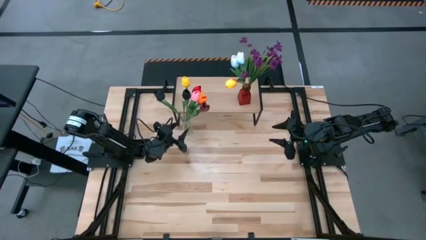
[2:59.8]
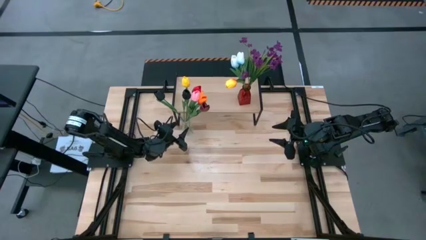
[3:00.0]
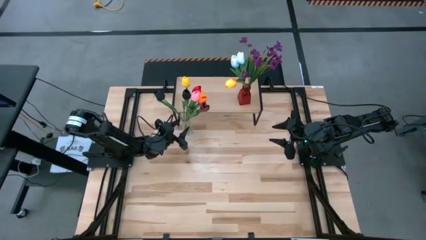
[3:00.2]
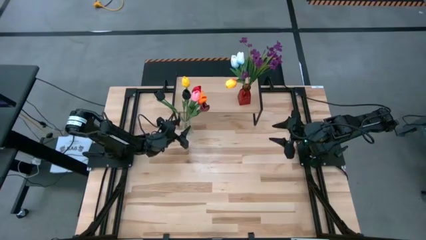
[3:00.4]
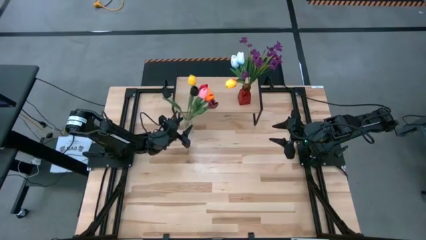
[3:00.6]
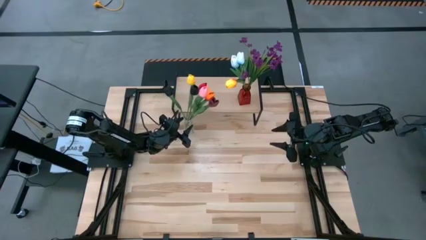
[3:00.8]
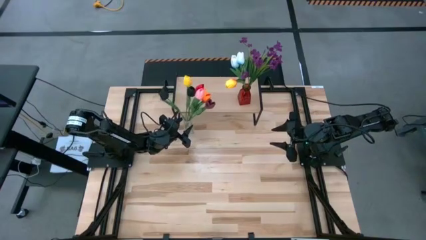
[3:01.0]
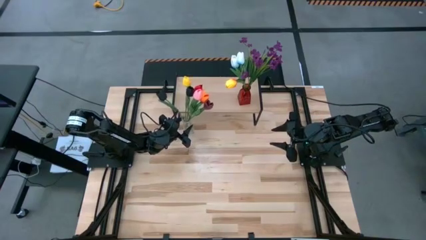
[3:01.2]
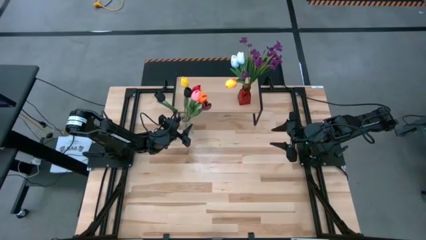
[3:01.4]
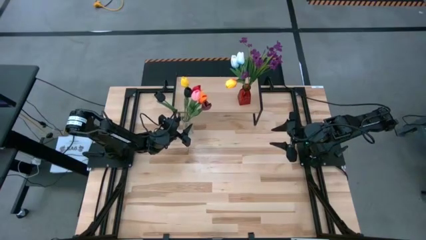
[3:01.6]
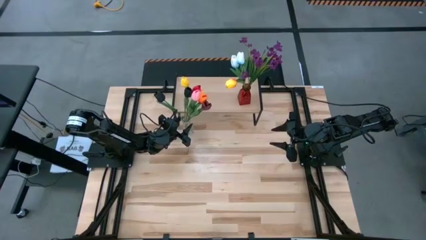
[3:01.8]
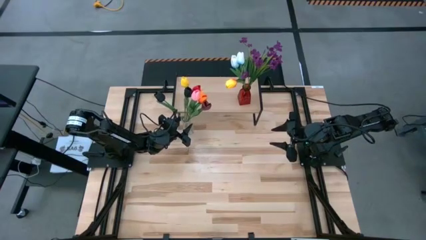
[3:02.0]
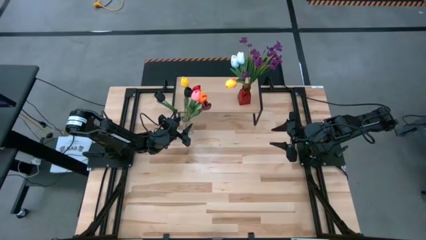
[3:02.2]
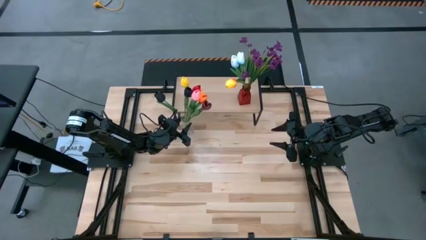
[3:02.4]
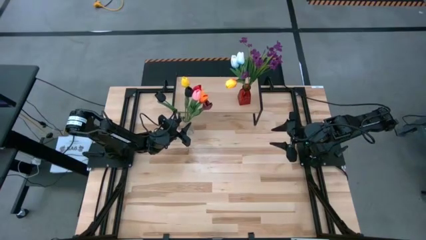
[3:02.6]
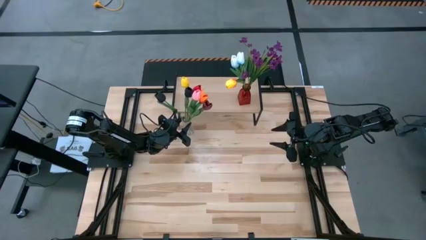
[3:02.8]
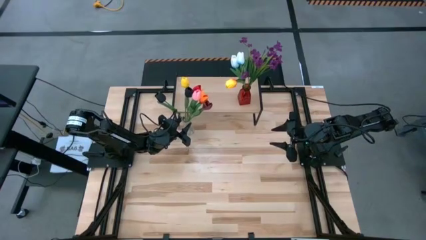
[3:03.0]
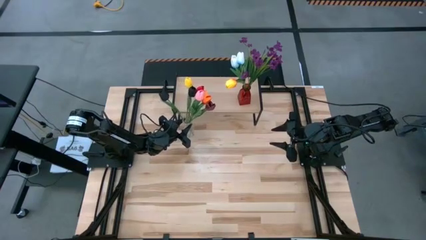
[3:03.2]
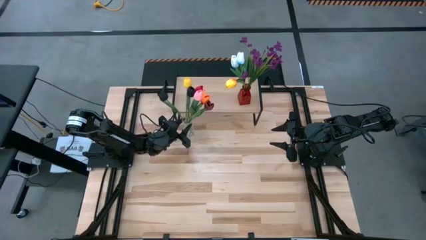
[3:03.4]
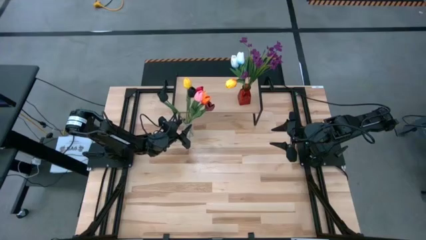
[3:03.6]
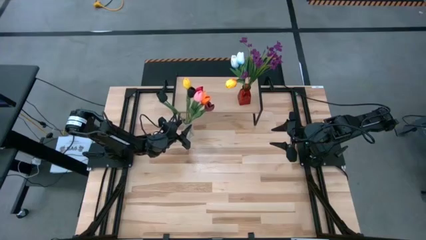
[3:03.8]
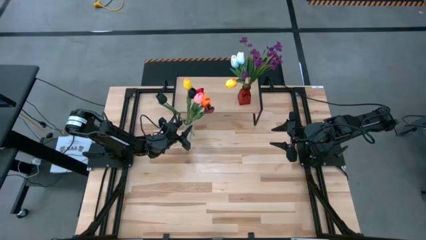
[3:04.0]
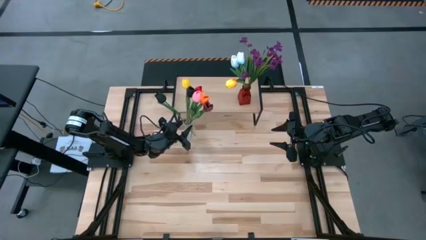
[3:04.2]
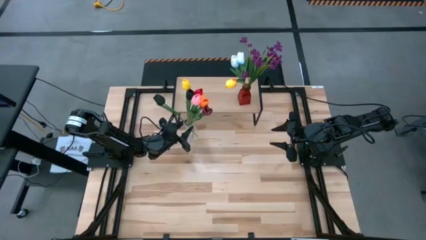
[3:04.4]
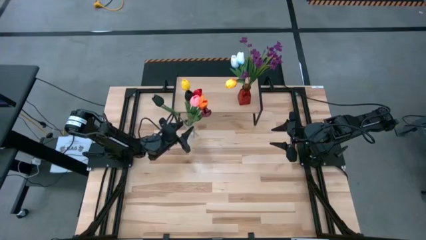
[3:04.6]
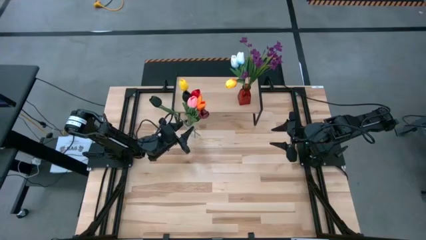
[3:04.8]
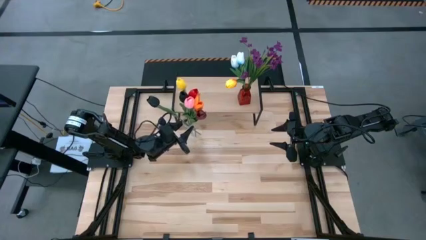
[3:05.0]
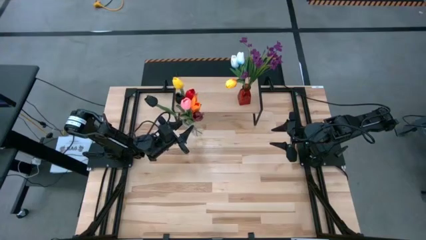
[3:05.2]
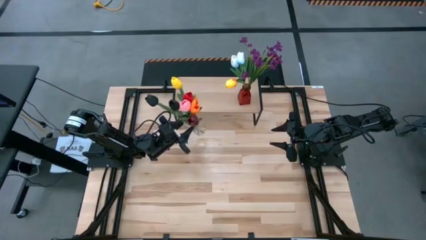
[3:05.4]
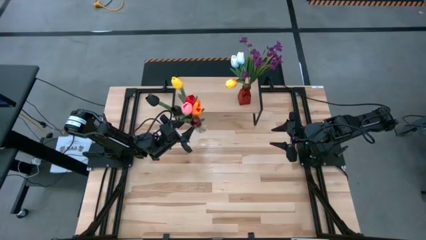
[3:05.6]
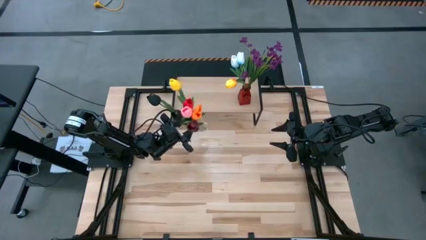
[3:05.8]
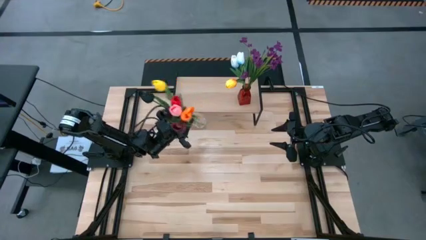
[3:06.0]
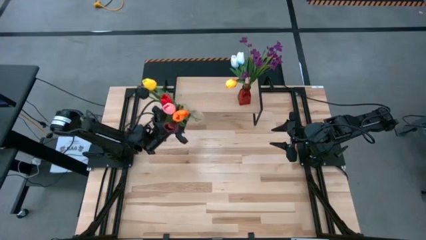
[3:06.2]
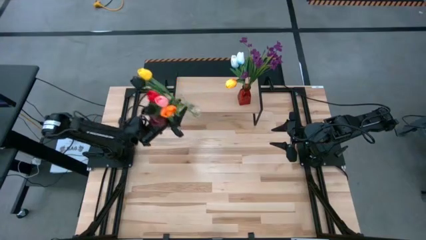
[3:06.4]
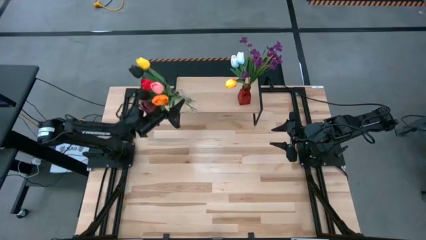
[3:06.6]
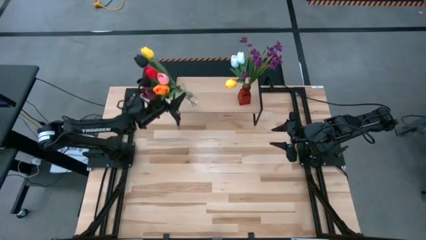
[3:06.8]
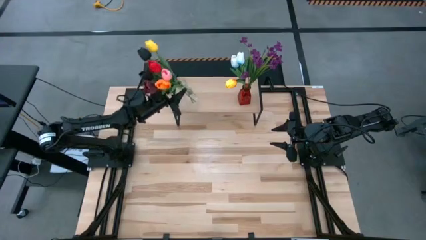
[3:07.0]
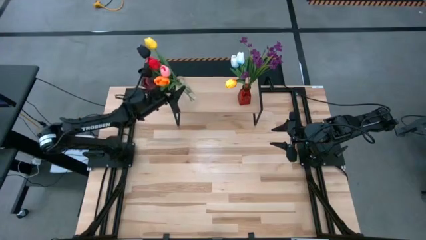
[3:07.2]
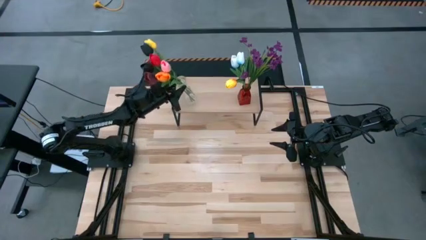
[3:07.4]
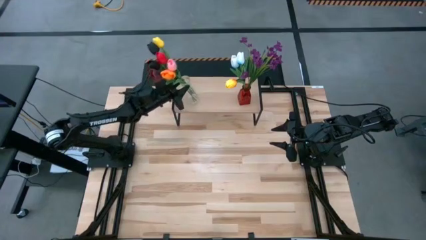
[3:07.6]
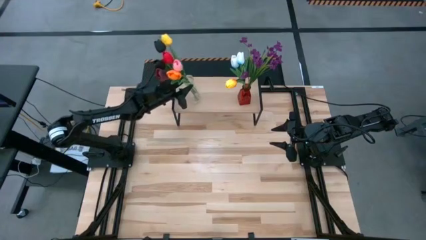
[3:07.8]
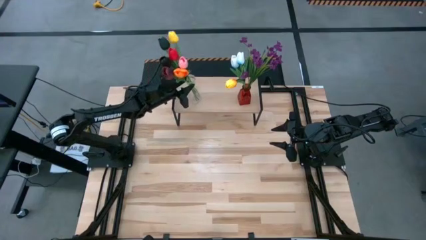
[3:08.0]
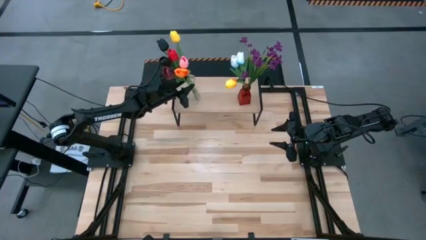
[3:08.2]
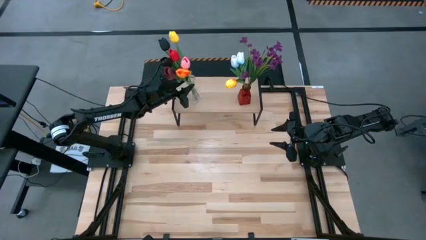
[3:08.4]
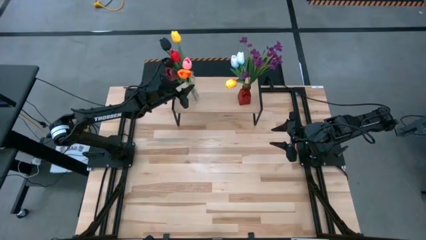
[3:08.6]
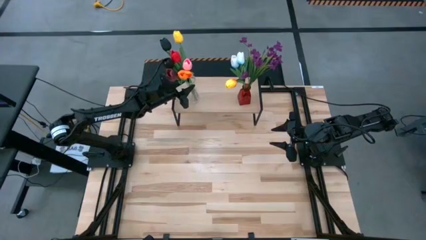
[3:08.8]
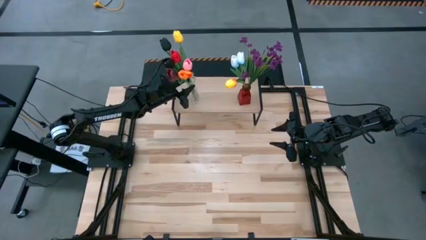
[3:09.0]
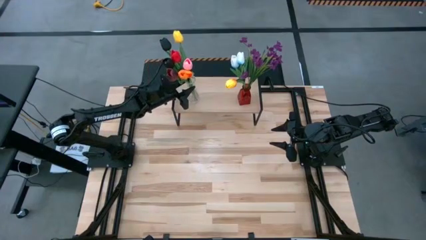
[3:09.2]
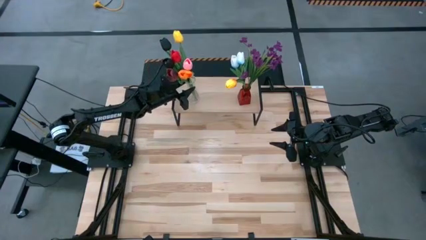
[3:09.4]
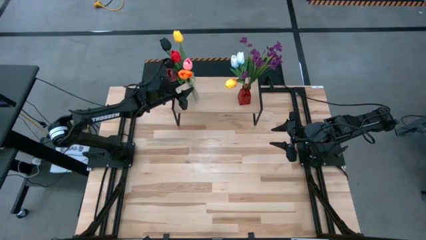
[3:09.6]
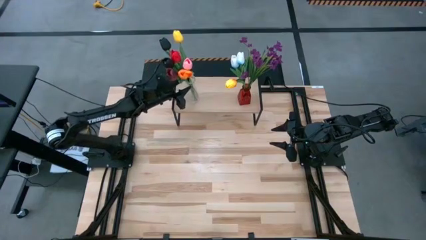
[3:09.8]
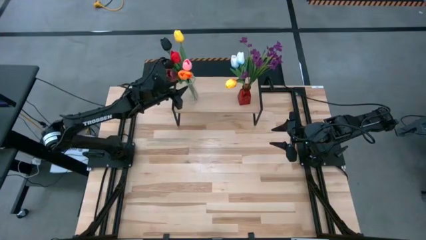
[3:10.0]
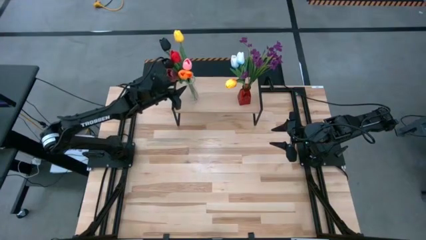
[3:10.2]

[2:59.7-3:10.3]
Task: Pick and place flowers into a vace then onto a shelf
Put the transparent vase on the shelf

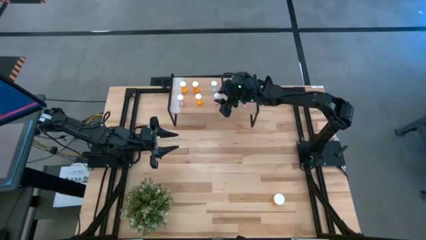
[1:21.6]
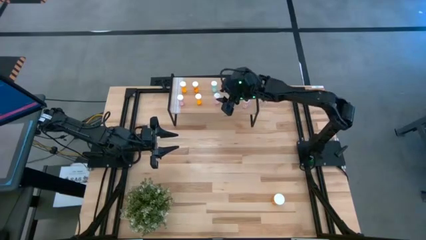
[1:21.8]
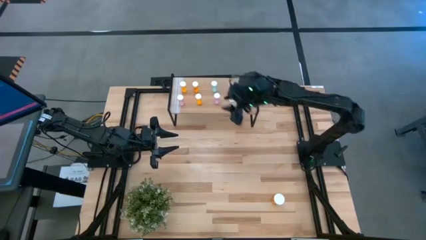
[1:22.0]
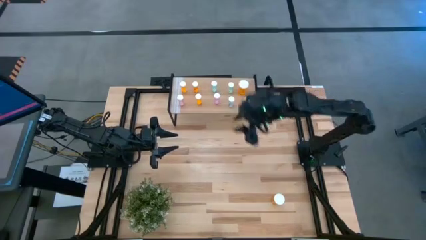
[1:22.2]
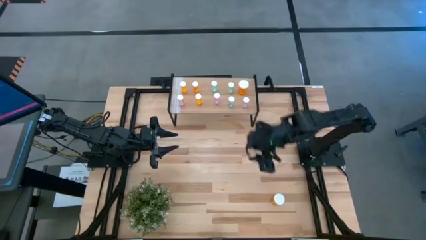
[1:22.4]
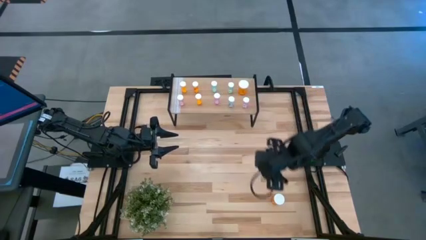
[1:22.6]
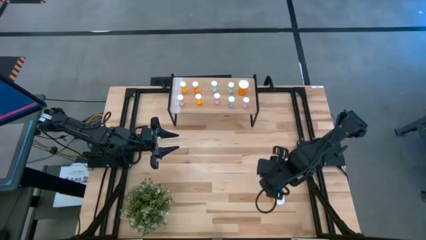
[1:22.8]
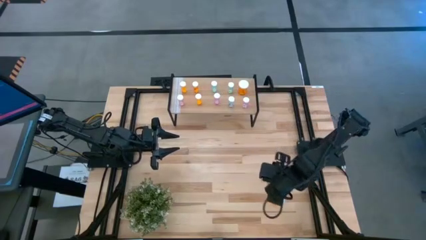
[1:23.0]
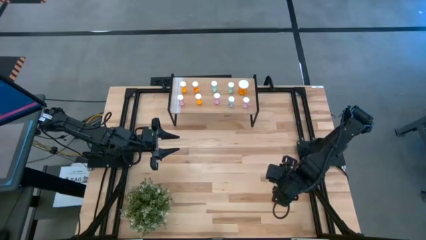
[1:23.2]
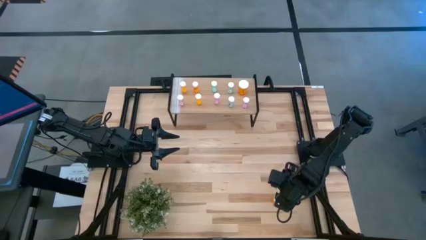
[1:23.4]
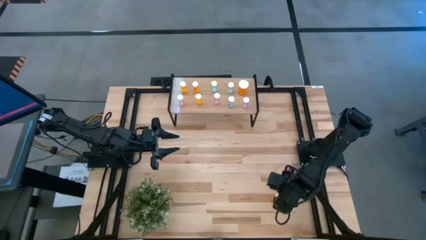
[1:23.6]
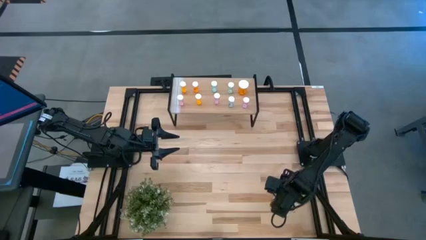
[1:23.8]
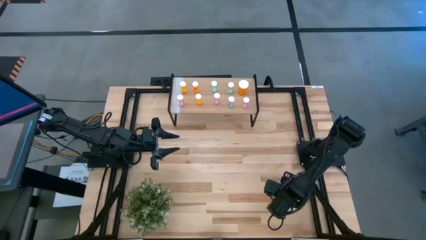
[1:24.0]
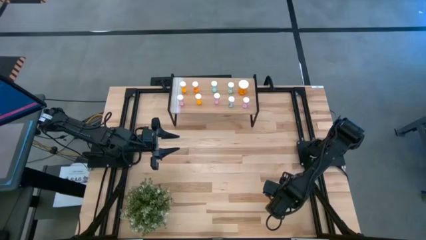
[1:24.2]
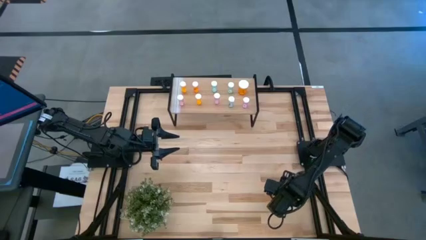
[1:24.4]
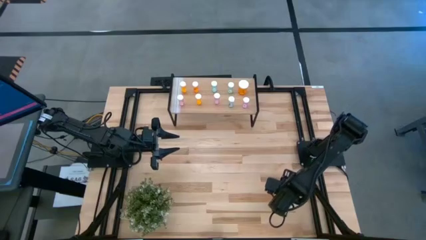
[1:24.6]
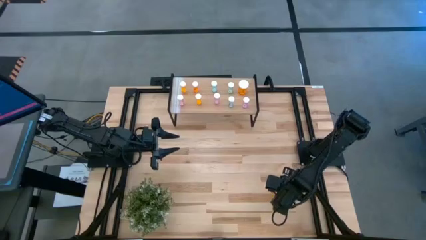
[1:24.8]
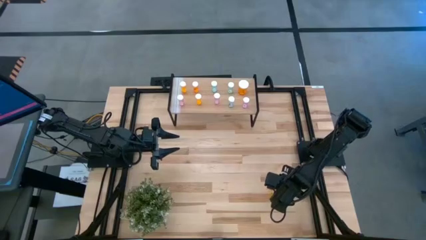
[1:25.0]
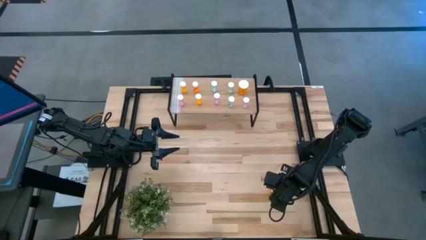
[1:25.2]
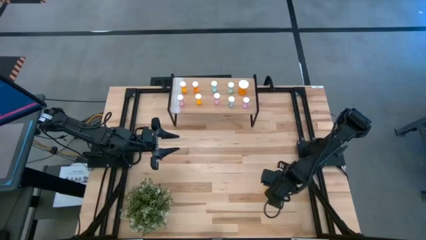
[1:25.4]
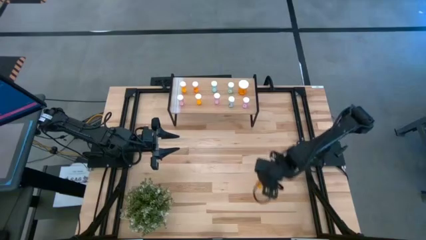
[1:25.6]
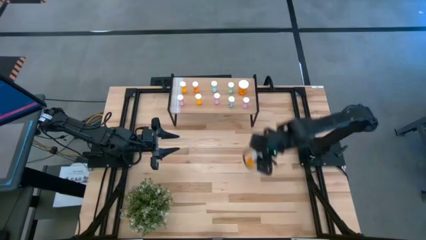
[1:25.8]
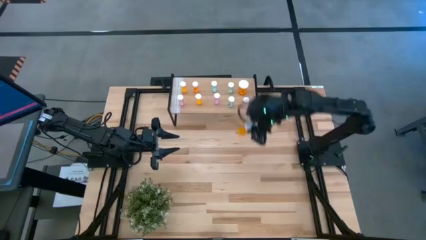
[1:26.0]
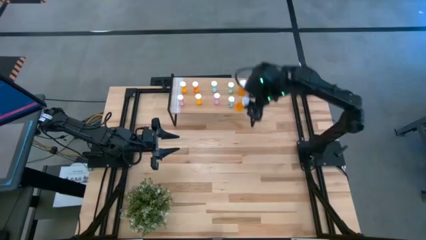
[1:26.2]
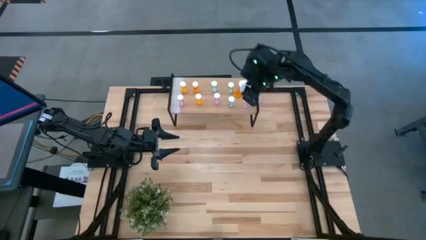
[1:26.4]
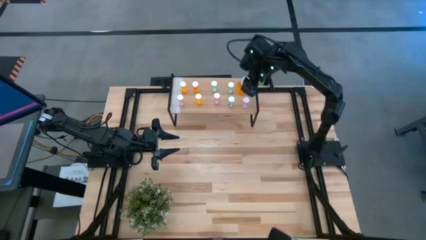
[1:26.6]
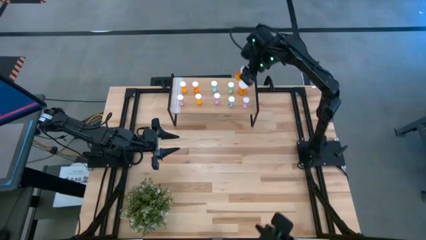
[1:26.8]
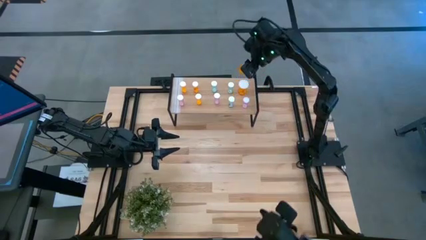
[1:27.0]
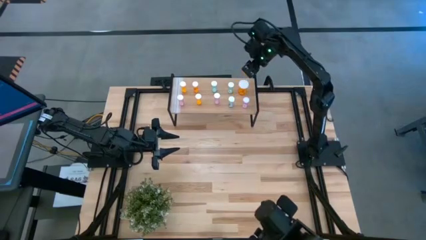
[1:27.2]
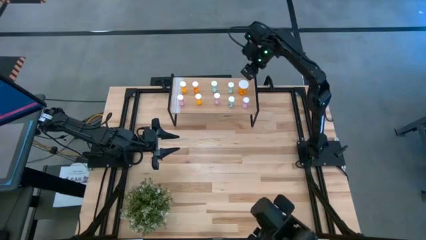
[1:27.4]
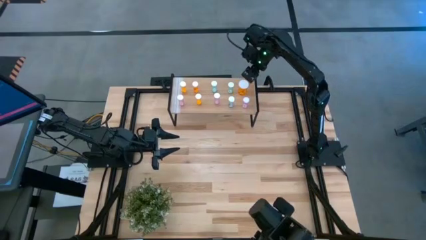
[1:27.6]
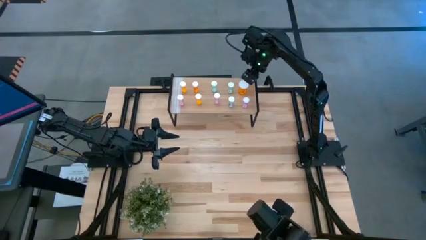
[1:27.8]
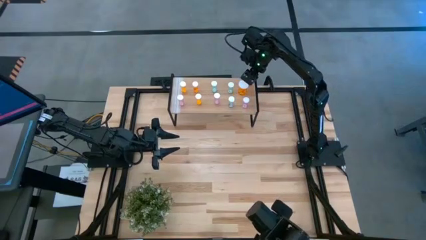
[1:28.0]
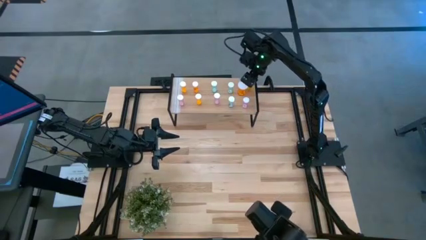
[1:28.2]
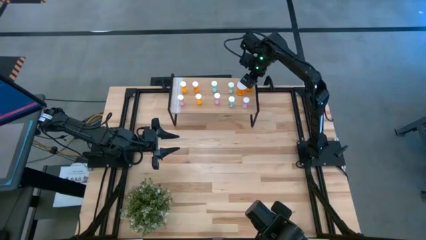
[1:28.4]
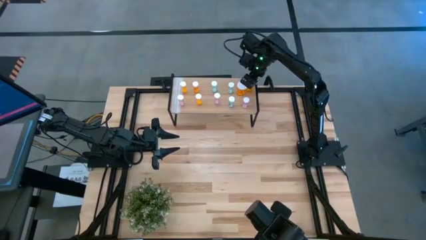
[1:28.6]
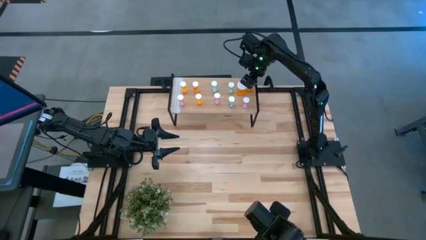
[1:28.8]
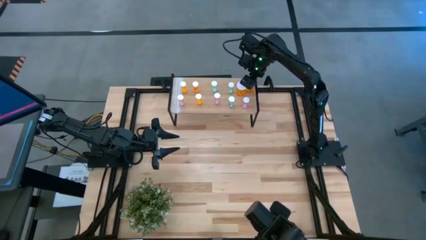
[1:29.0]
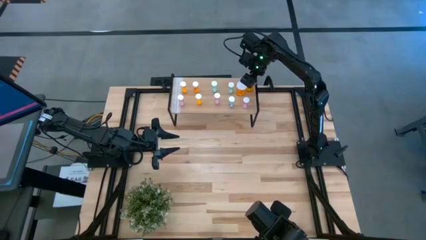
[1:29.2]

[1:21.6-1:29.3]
Task: Pick and place medicine bottles onto shelf by color
Put the large orange pill bottle on the shelf
